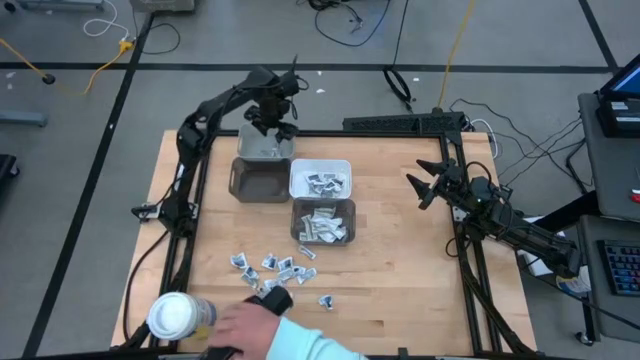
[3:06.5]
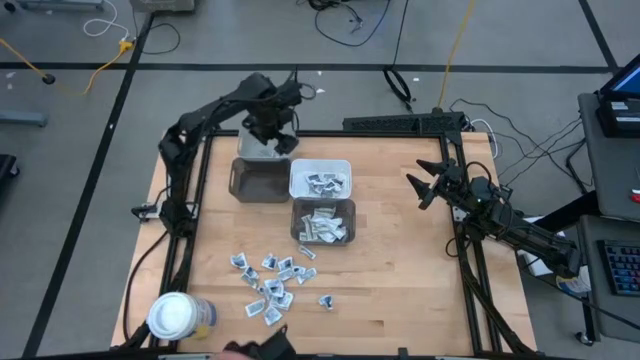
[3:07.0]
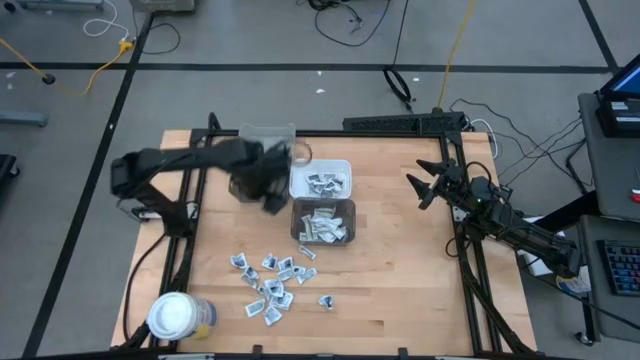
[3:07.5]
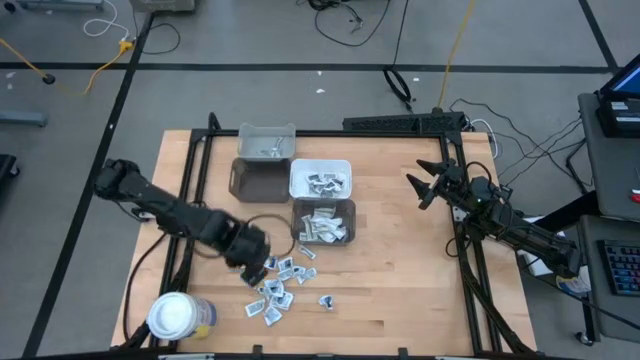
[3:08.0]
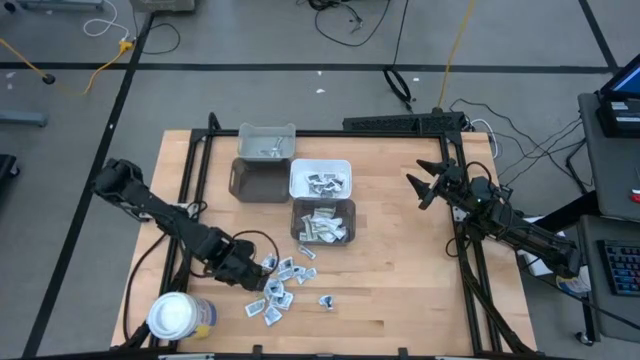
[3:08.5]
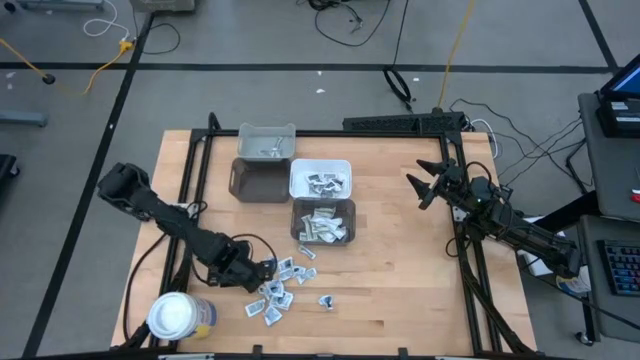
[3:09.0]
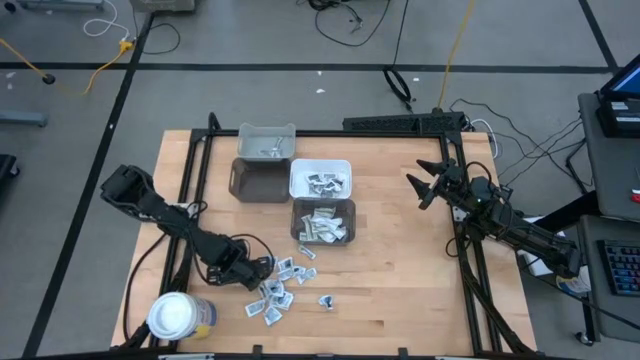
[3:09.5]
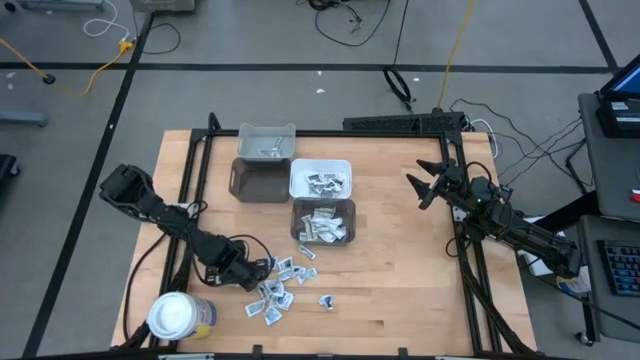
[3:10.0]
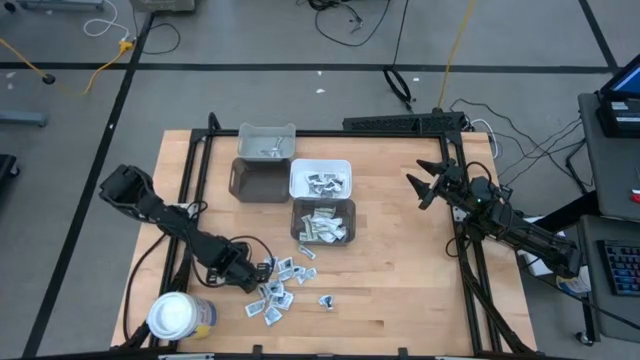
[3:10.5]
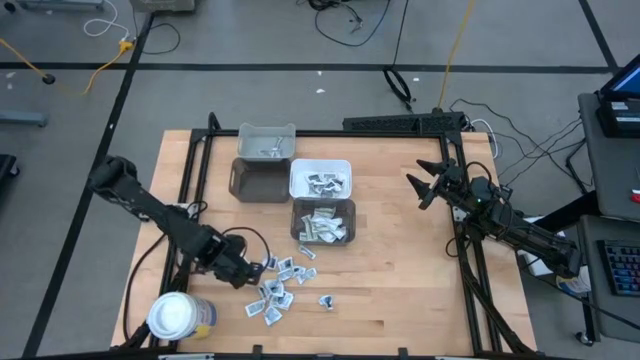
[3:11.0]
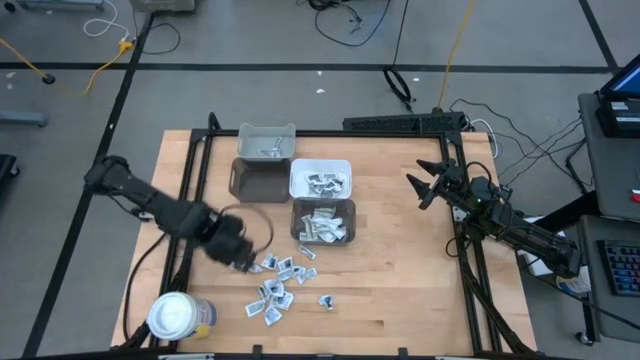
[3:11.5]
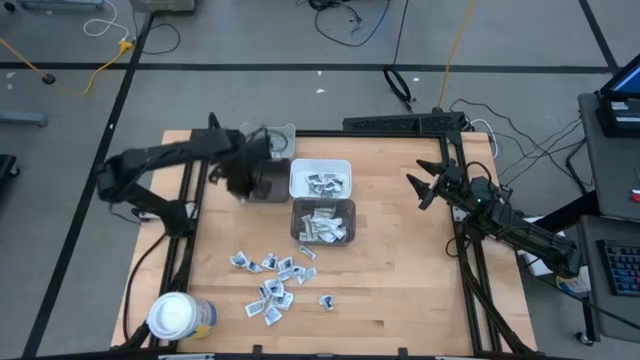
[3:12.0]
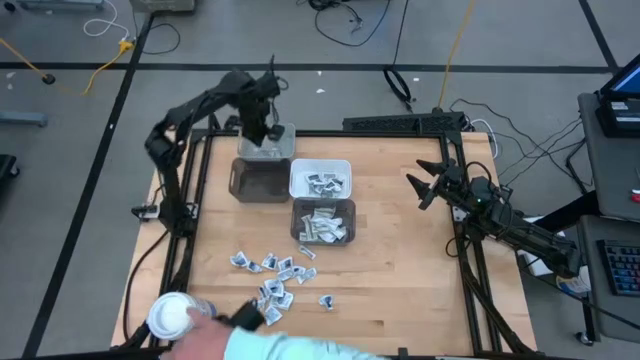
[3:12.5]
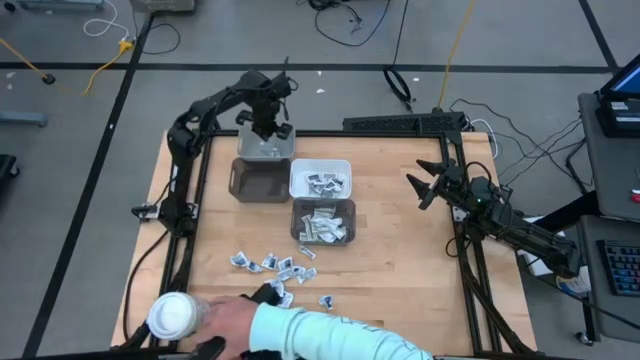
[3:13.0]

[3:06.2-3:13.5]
Task: Pick & Place First Aid Supplies
Put the orange ointment pack into the gray bin

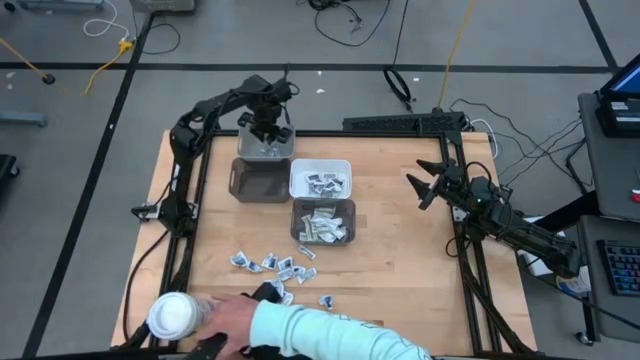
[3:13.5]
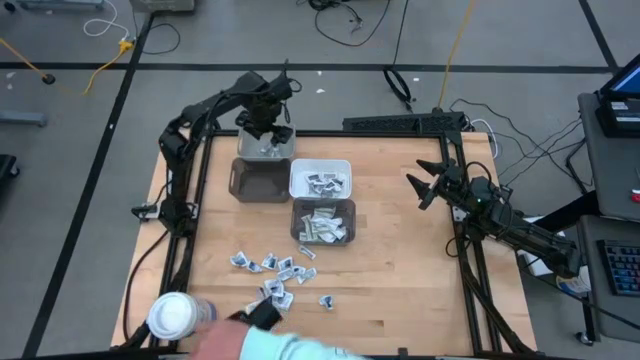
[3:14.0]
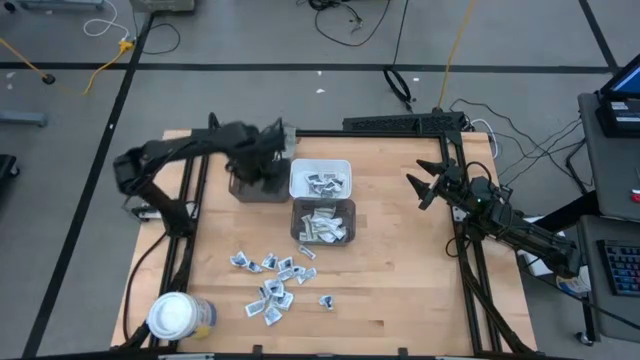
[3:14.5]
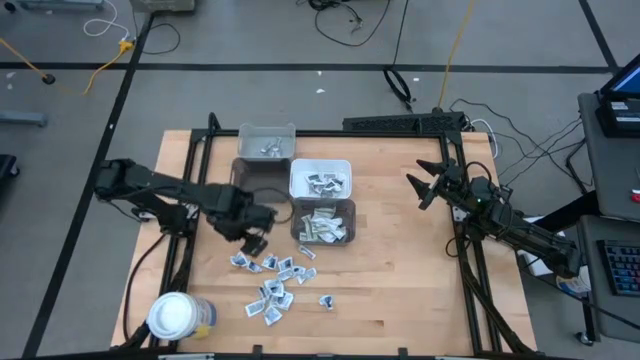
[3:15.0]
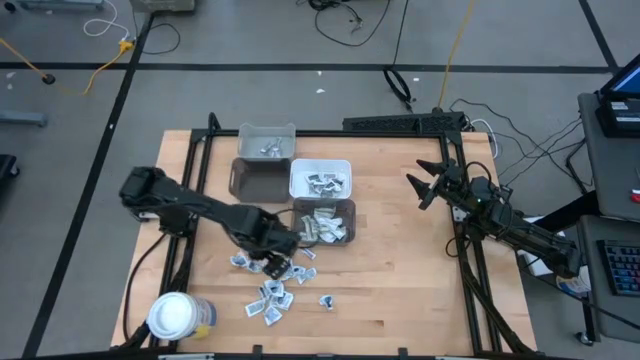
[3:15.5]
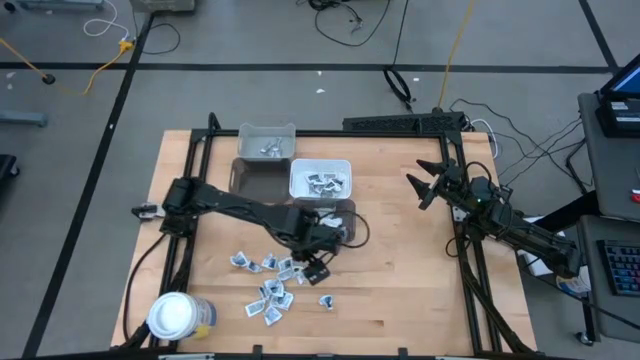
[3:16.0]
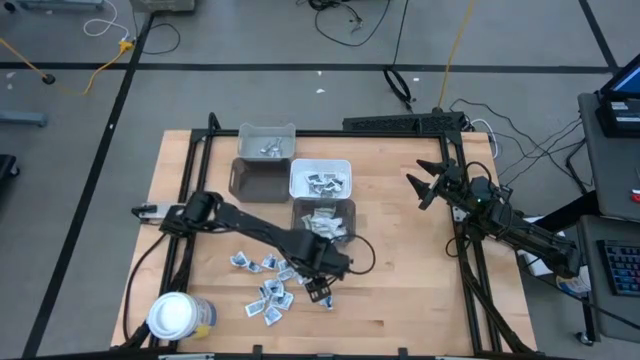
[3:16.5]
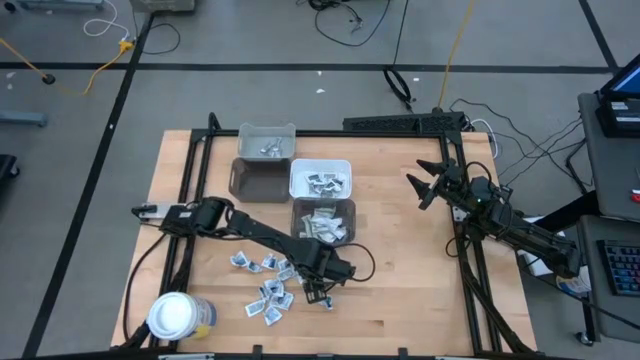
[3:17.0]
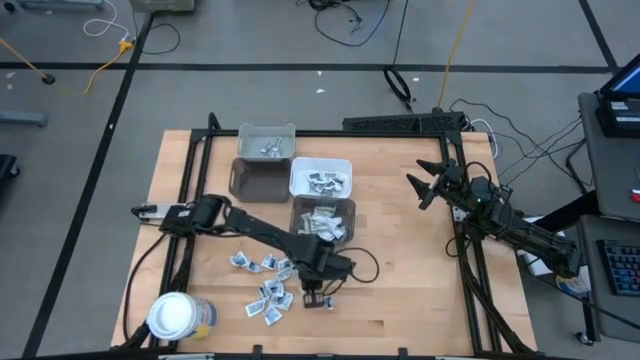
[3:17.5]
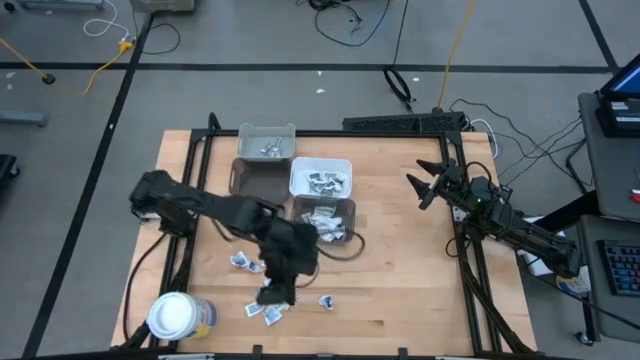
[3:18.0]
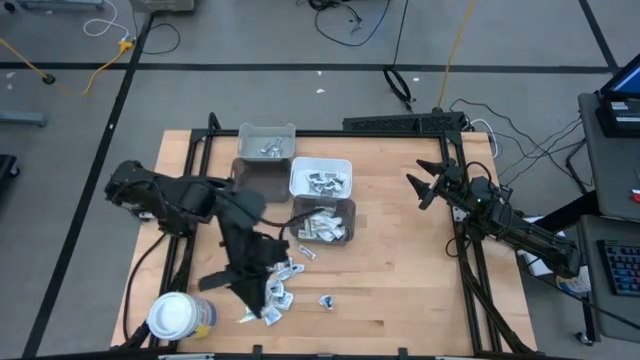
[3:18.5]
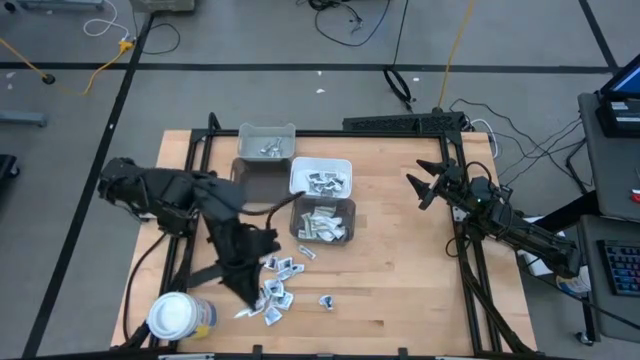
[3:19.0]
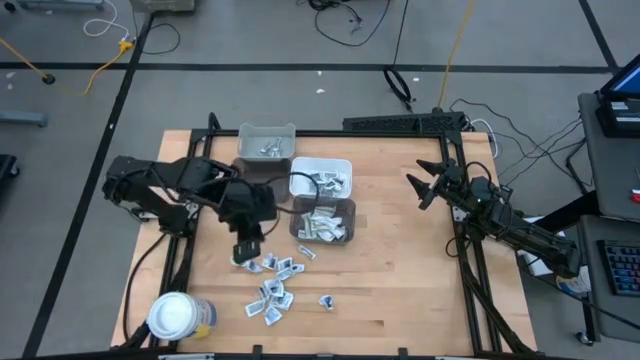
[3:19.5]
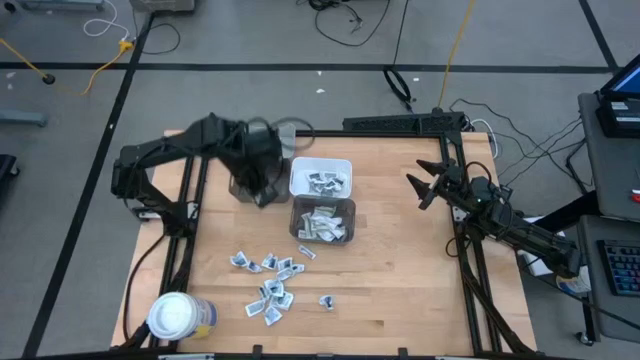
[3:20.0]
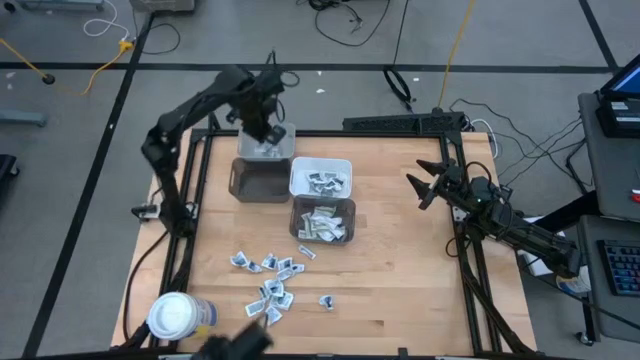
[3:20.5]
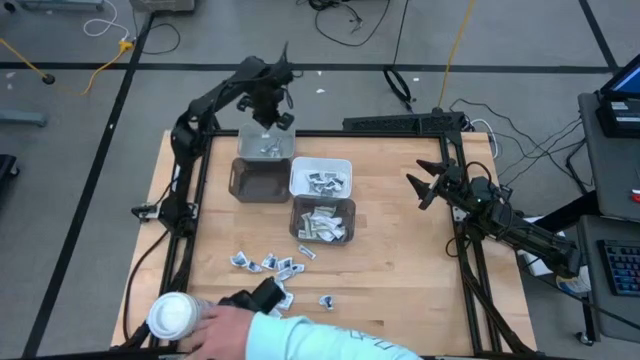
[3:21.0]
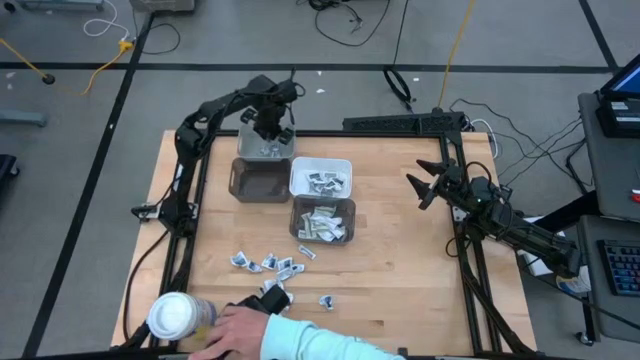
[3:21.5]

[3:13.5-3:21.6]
Put the orange ointment pack into the gray bin

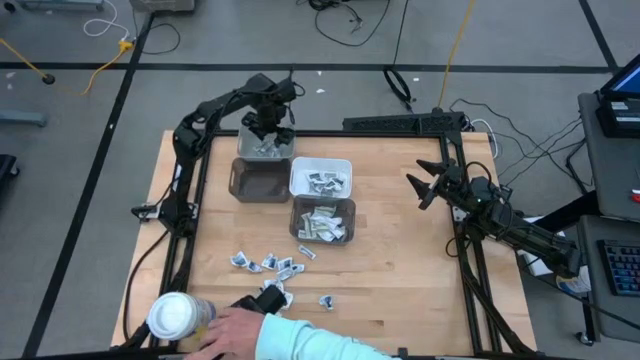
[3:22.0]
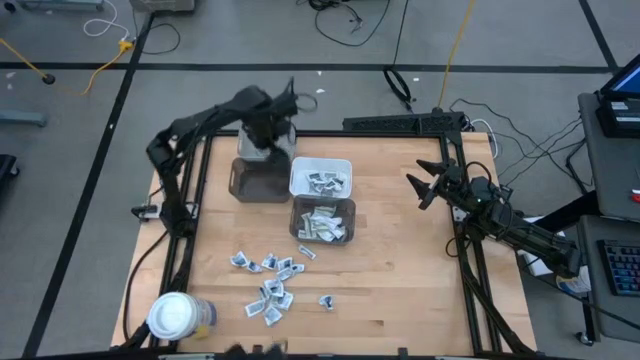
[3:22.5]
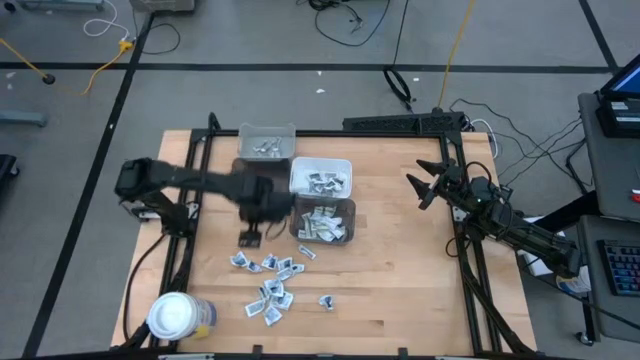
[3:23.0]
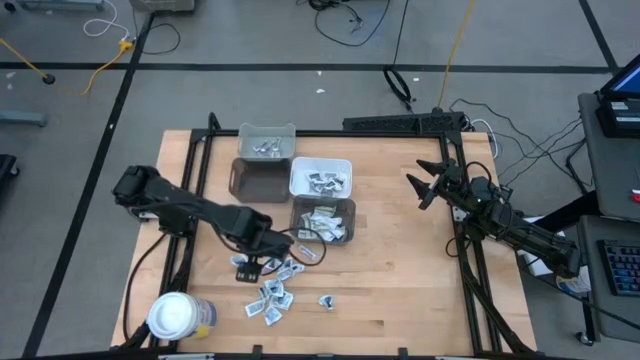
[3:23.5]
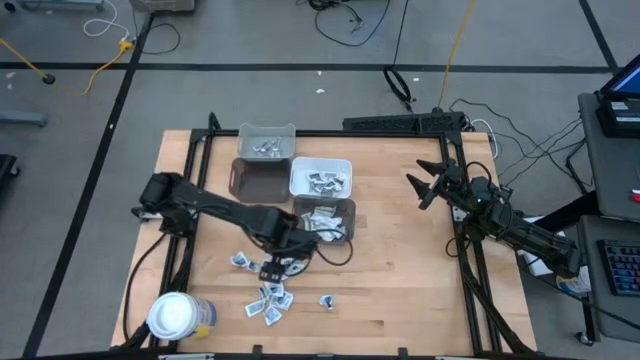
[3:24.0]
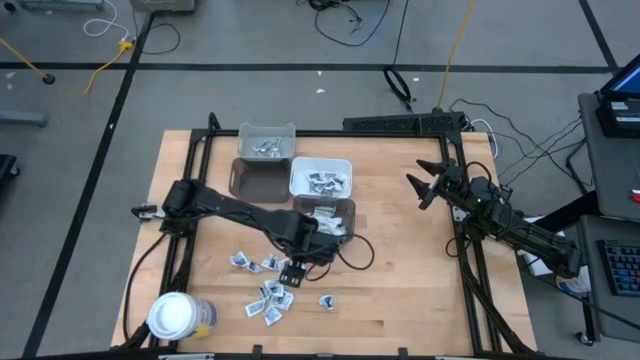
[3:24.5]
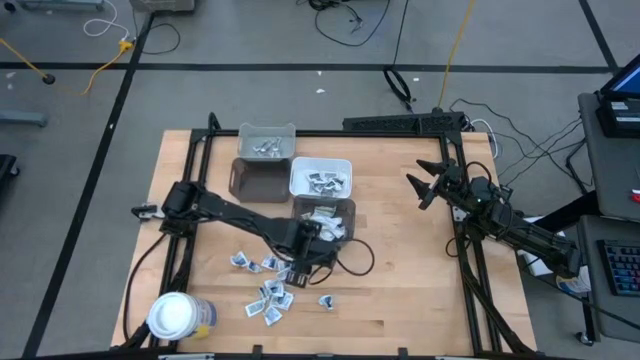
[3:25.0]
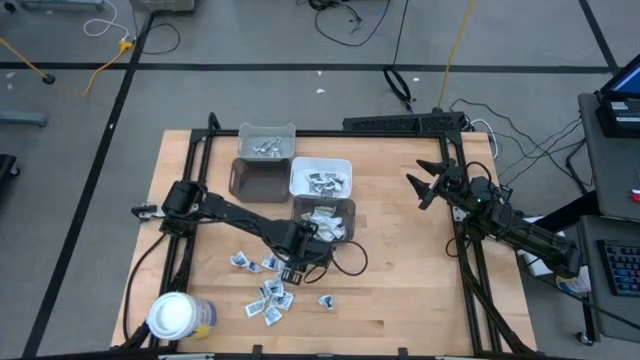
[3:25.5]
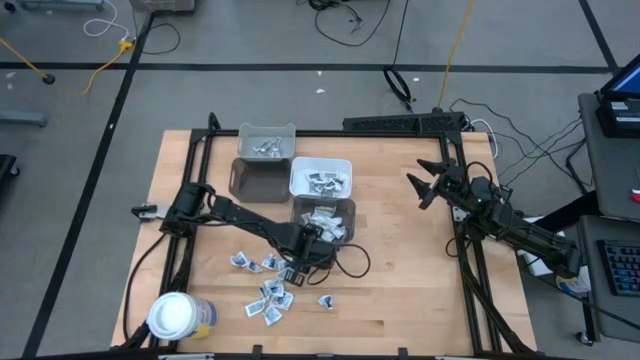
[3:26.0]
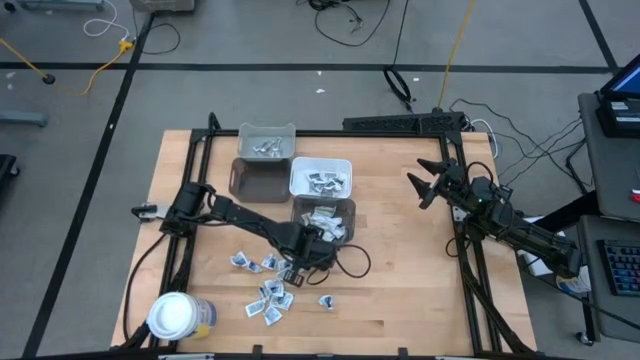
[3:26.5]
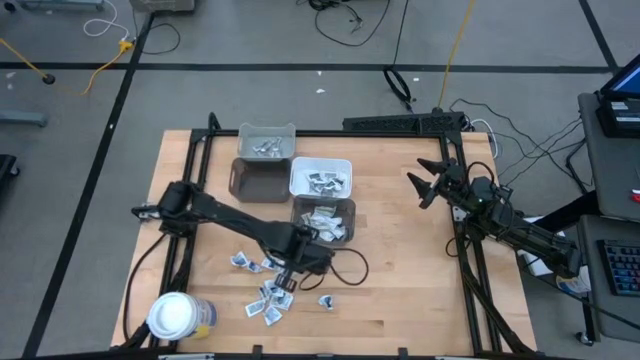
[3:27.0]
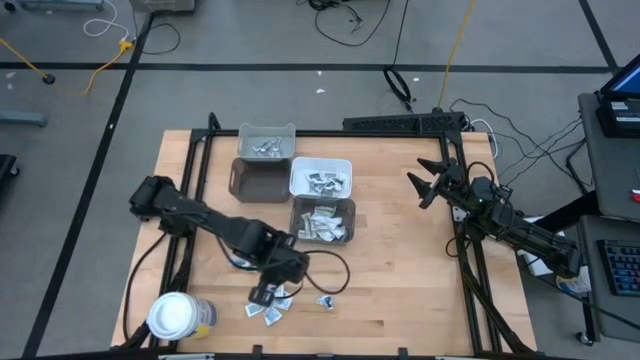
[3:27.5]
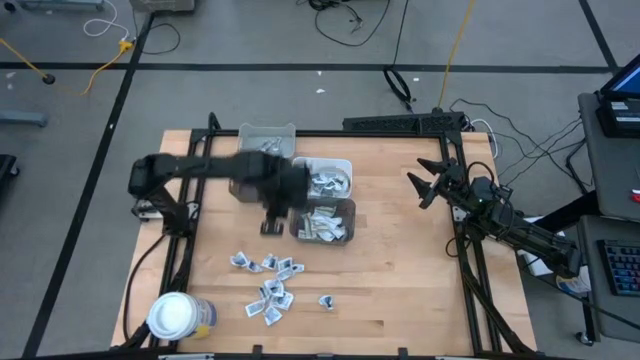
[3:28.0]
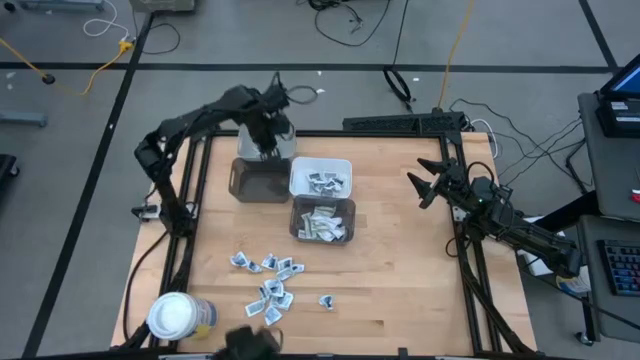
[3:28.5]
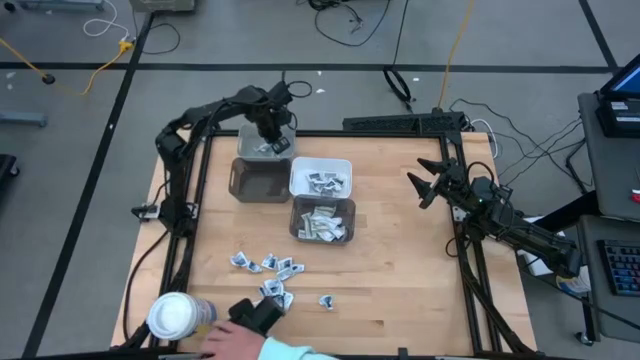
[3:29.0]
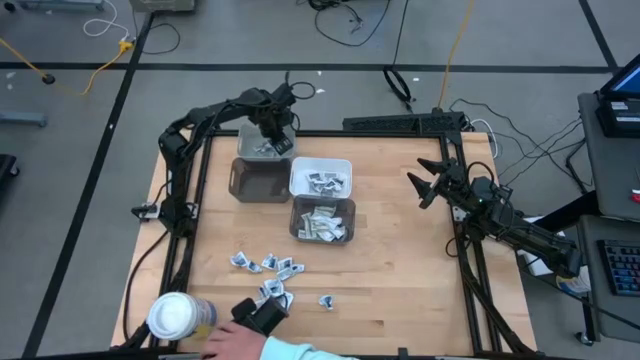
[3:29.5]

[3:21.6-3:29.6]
Put the orange ointment pack into the gray bin
